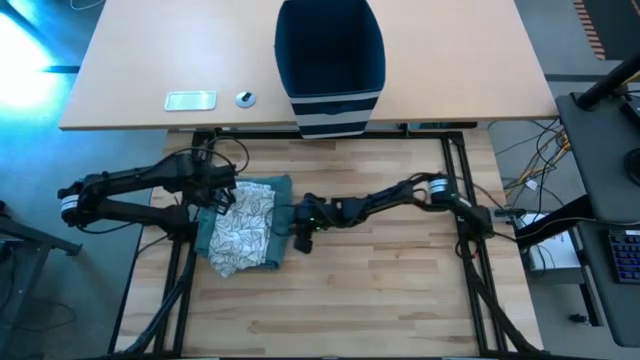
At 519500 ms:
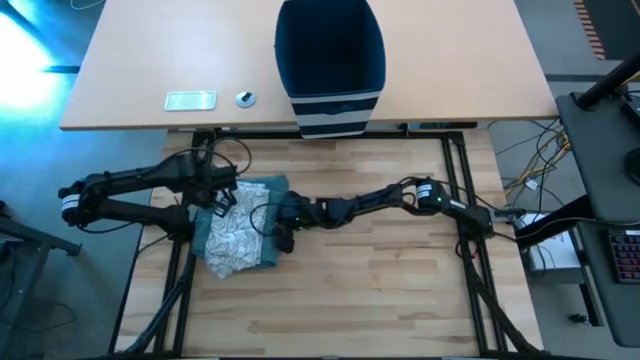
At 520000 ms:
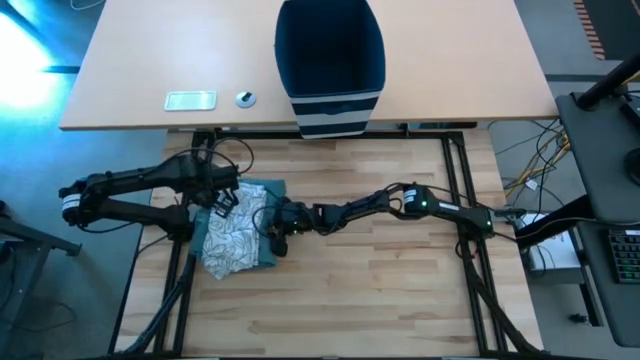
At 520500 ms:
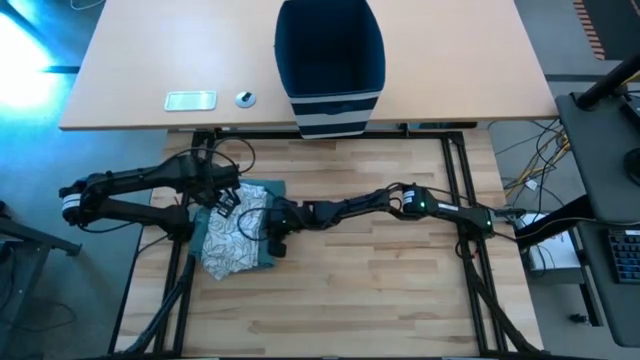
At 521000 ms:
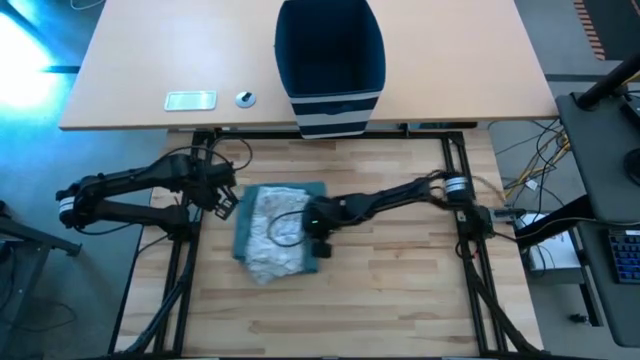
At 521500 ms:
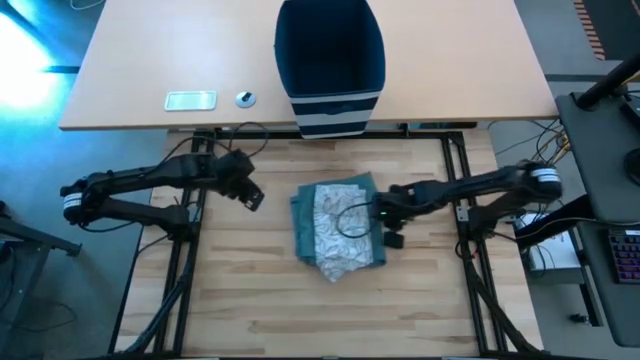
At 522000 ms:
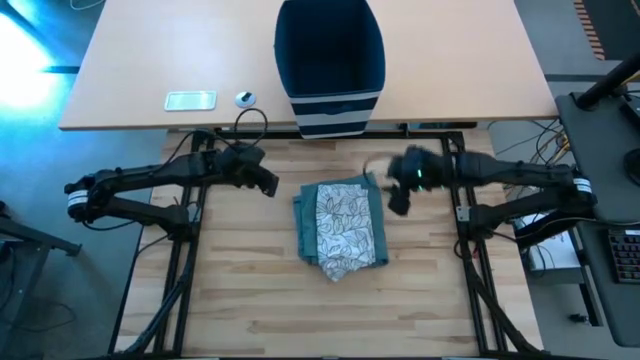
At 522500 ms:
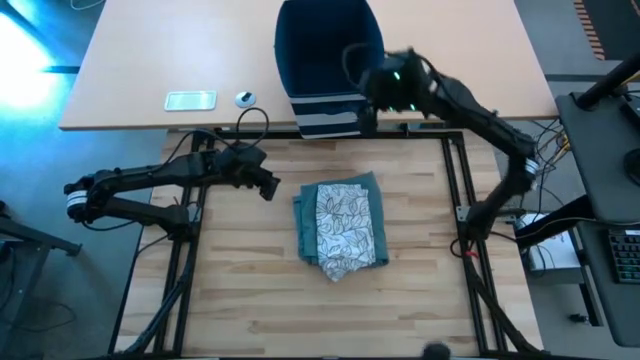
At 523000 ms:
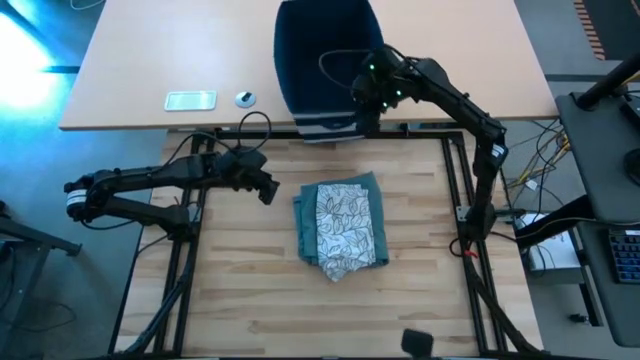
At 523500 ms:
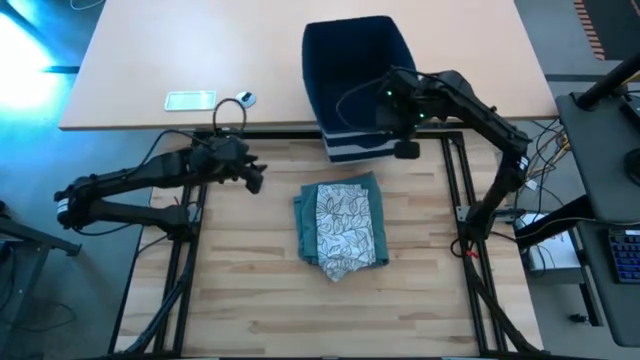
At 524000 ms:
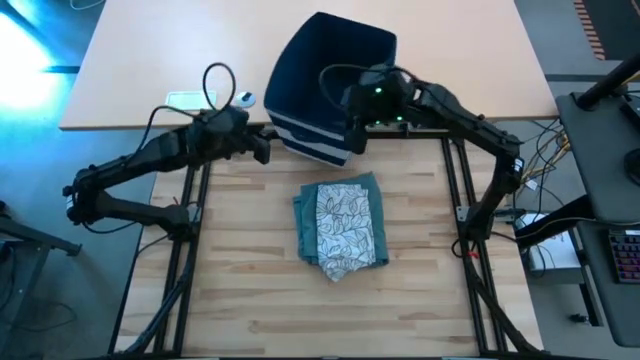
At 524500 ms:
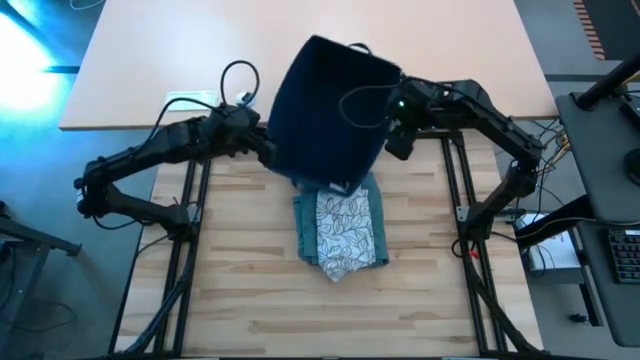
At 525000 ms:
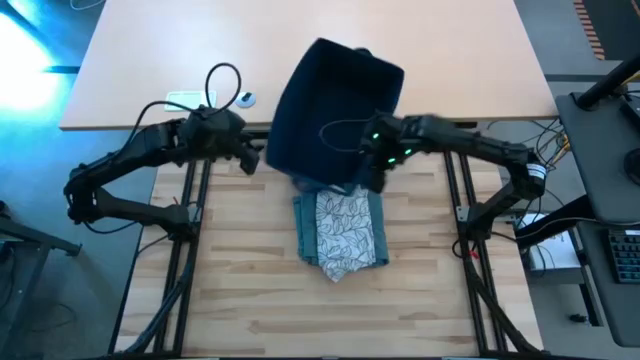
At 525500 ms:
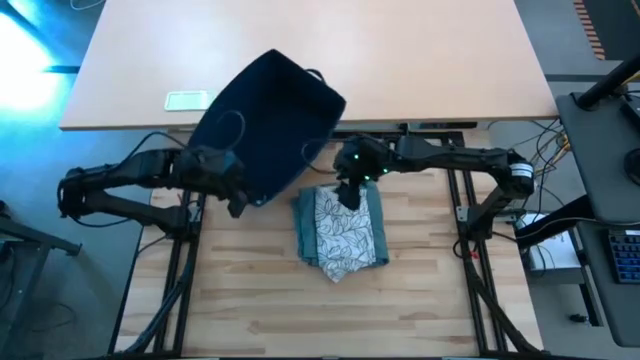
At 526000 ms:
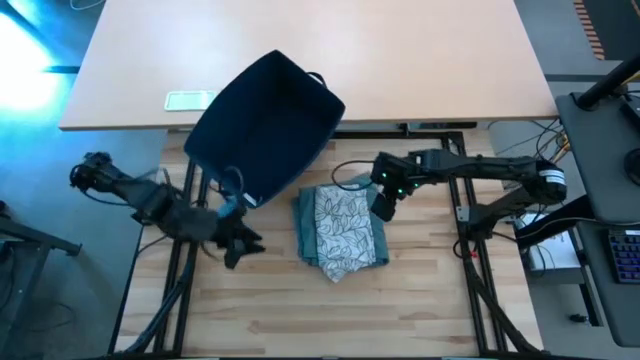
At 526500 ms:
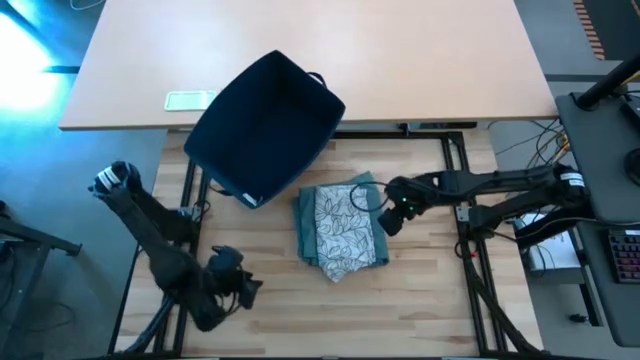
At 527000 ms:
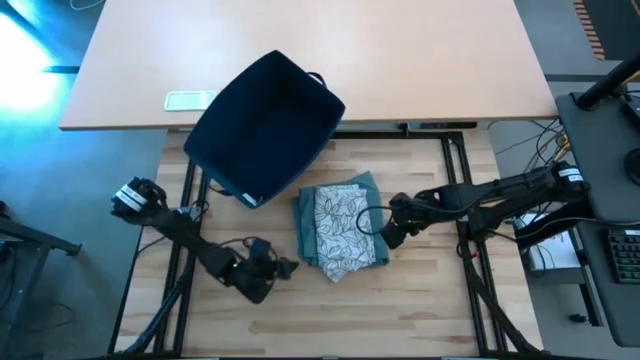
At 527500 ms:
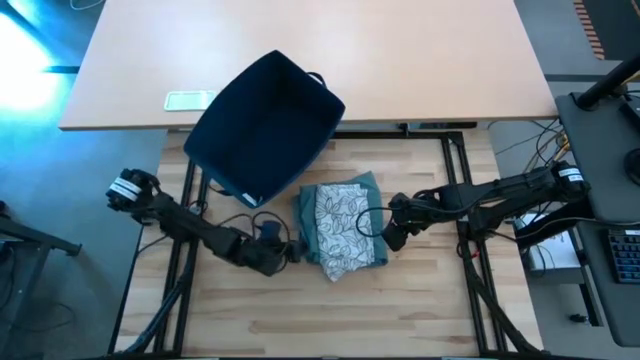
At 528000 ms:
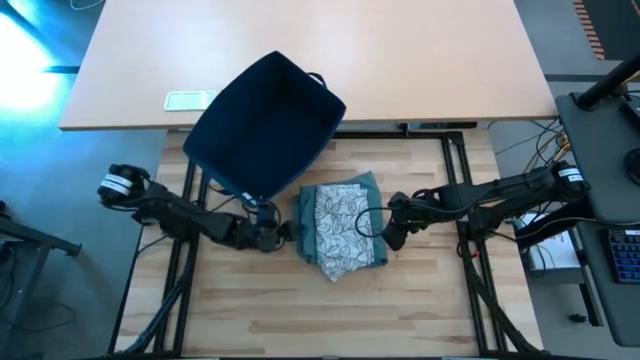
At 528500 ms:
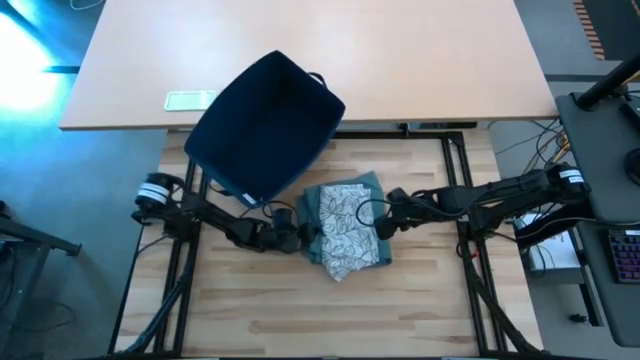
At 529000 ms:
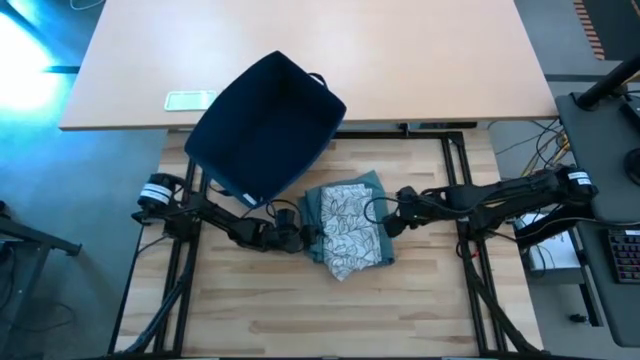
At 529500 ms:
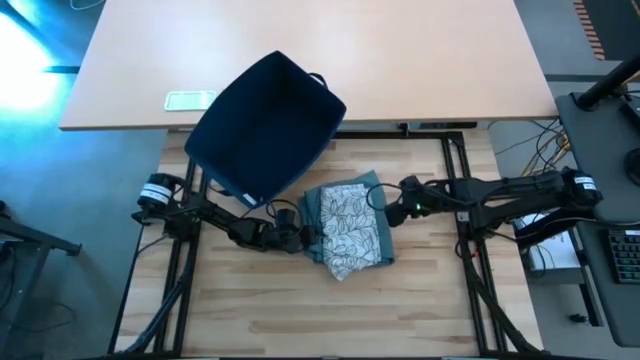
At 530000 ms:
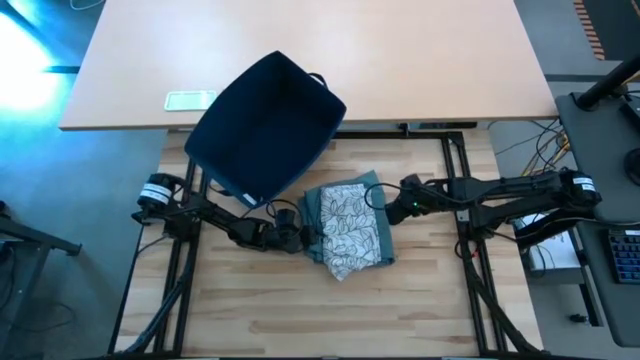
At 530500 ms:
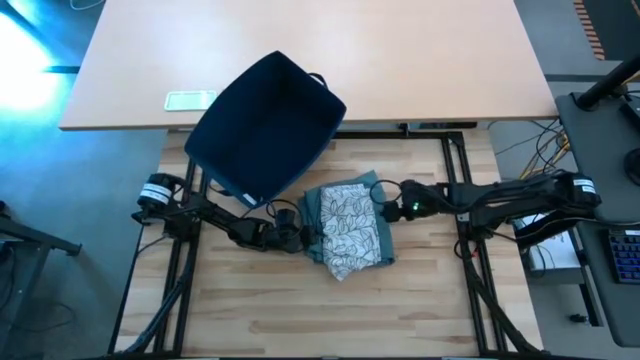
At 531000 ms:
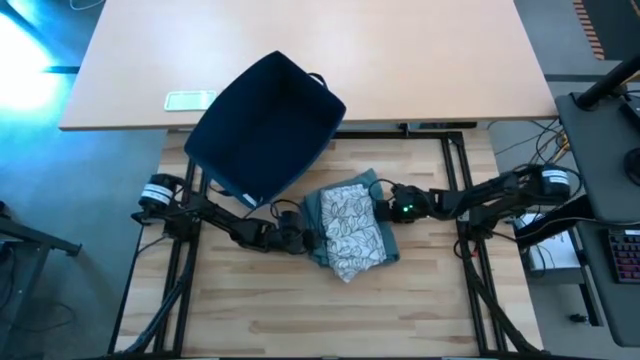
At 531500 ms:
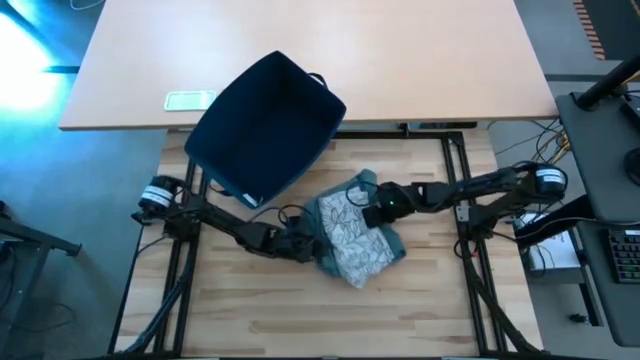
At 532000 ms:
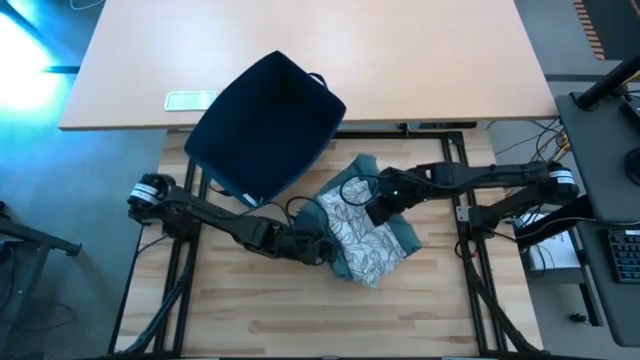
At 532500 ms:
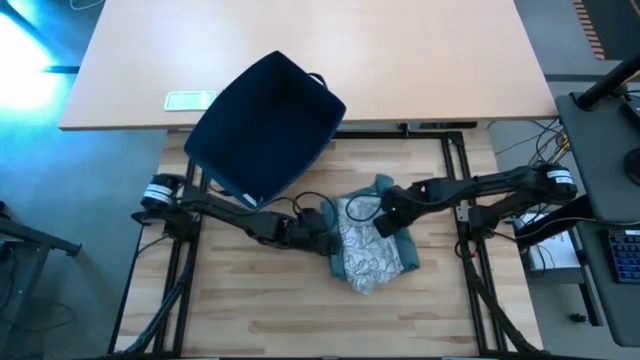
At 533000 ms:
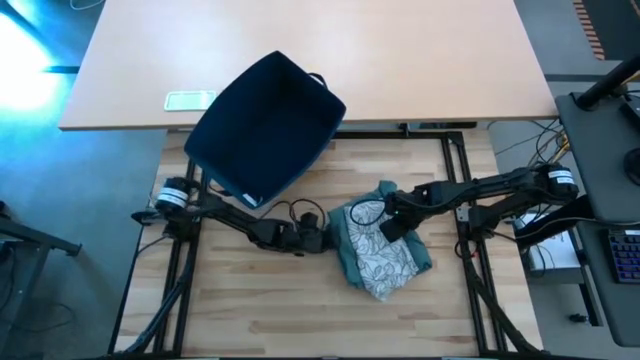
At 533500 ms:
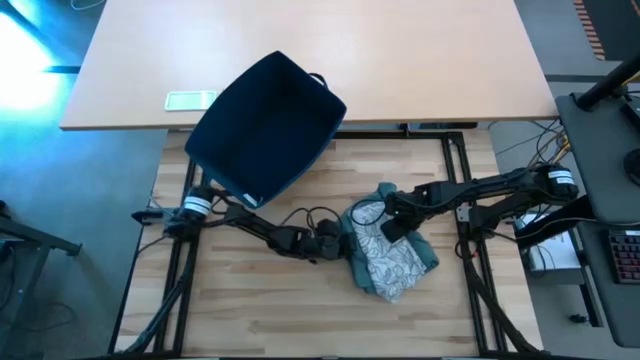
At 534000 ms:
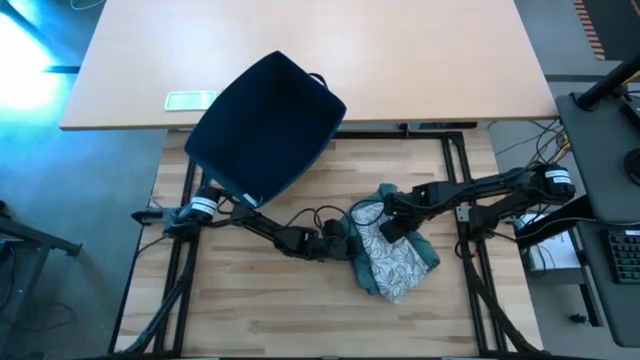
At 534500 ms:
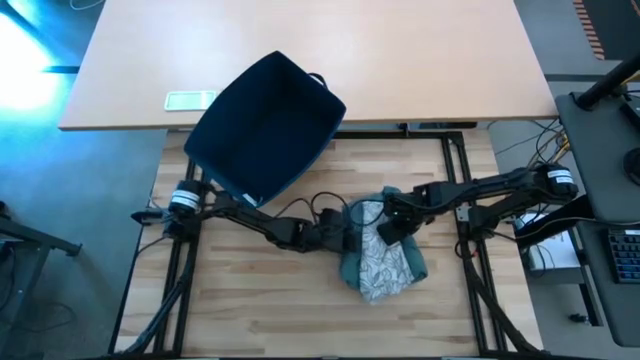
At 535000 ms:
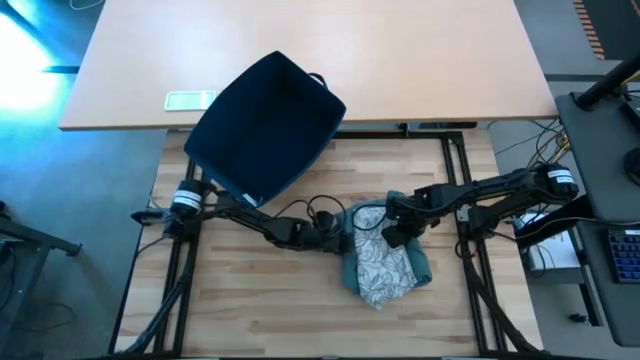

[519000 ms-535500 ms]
Task: Fold Laundry from Bin
Put the folded clothes into the laundry basket

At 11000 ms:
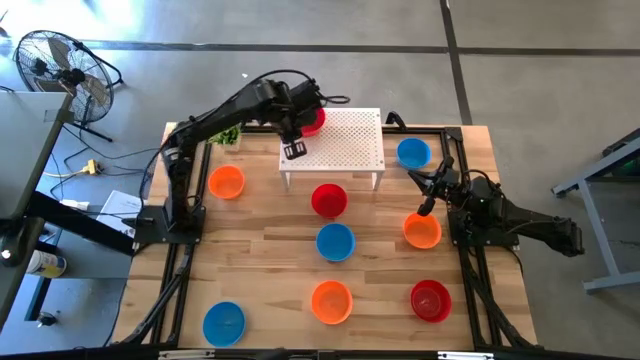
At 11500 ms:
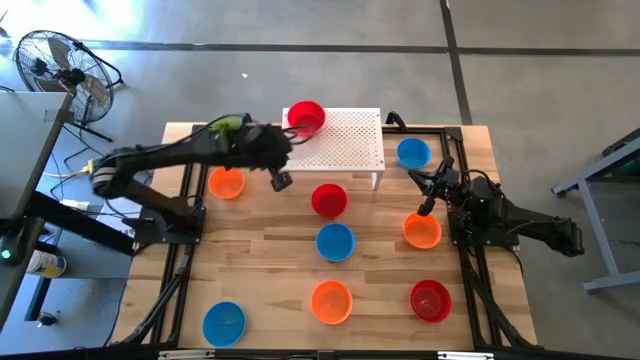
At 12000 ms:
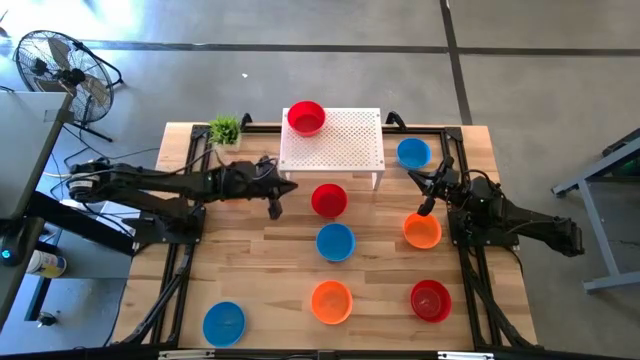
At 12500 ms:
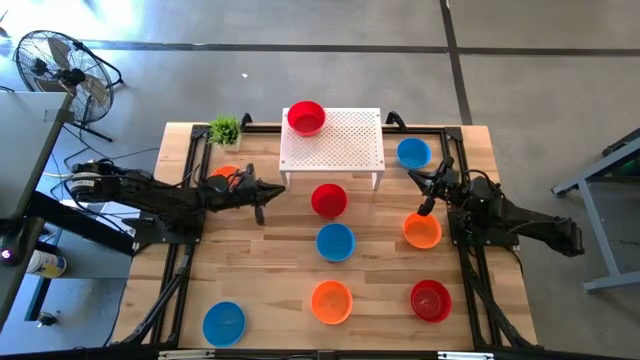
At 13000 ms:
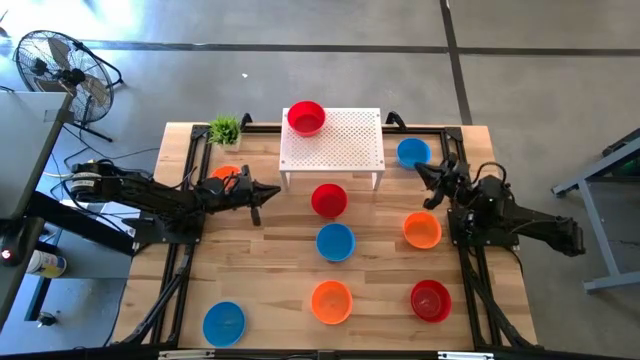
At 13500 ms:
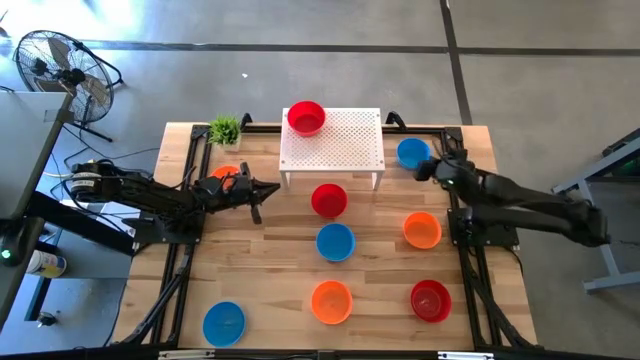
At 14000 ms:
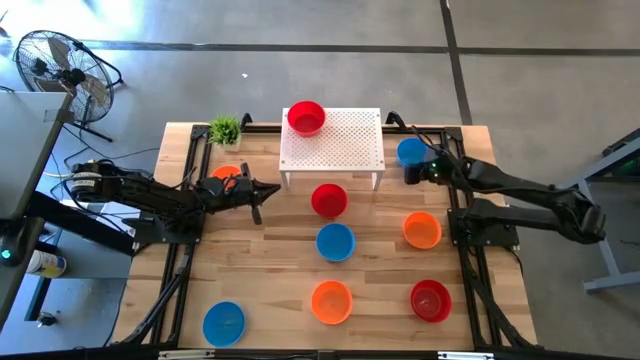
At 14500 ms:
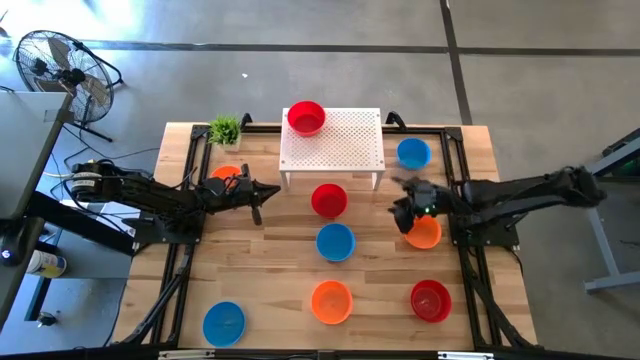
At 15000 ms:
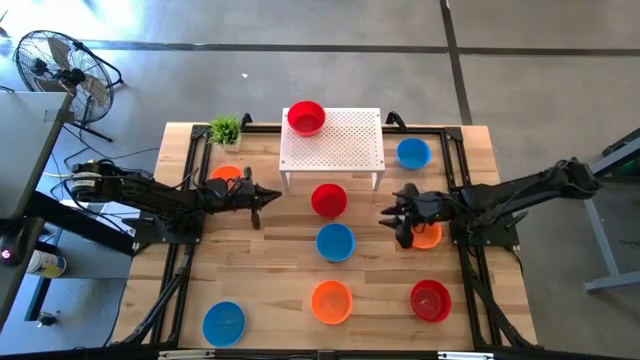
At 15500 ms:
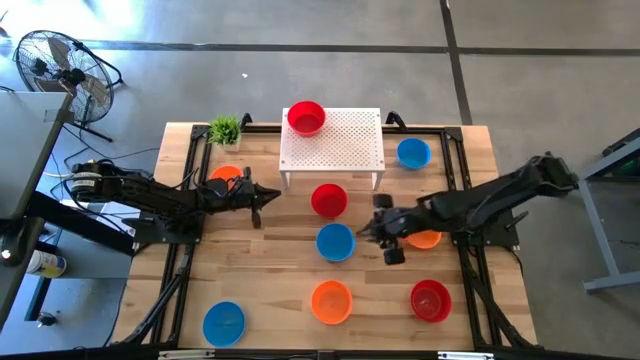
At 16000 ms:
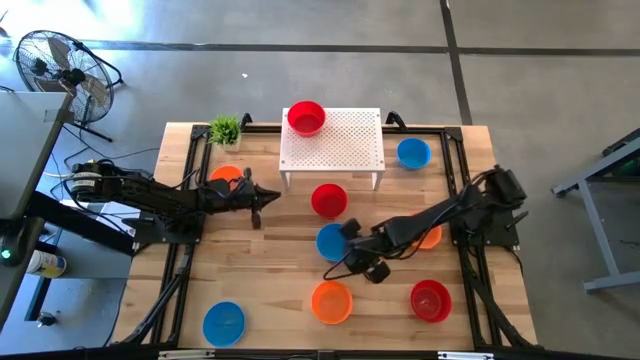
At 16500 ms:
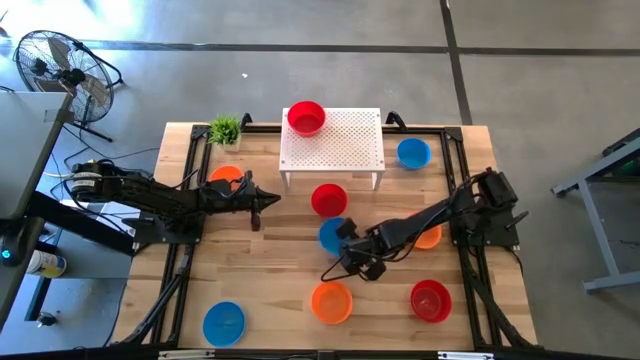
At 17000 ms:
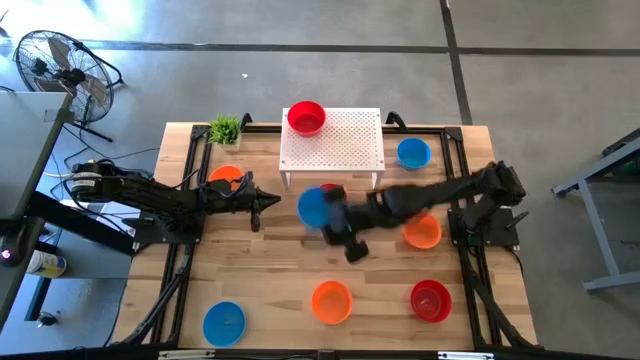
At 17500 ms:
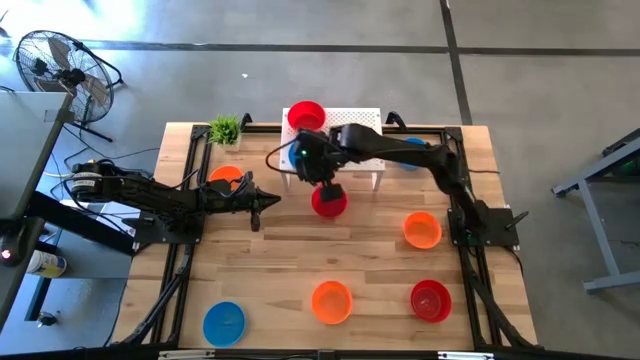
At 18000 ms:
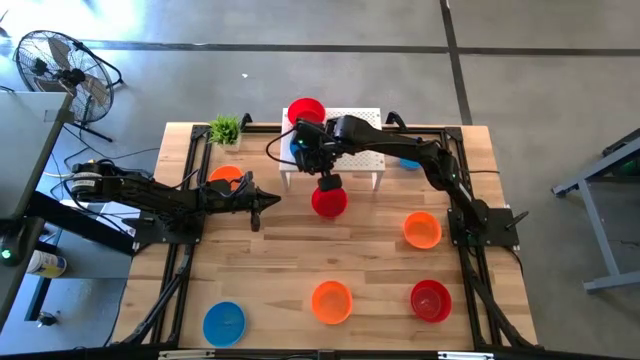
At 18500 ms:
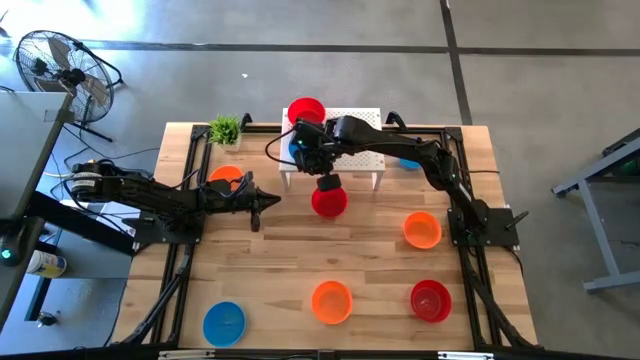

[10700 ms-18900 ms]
Task: Pick & Place Mini bowls
Put the middle blue bowl on the shelf
